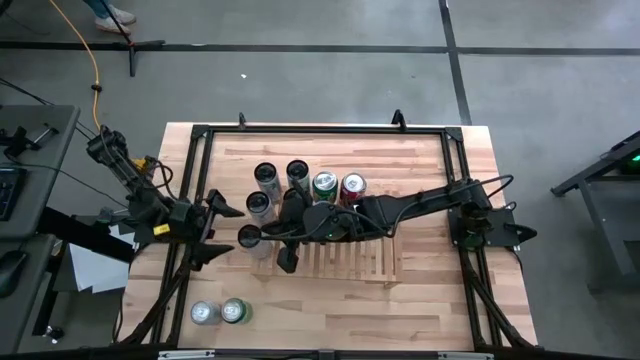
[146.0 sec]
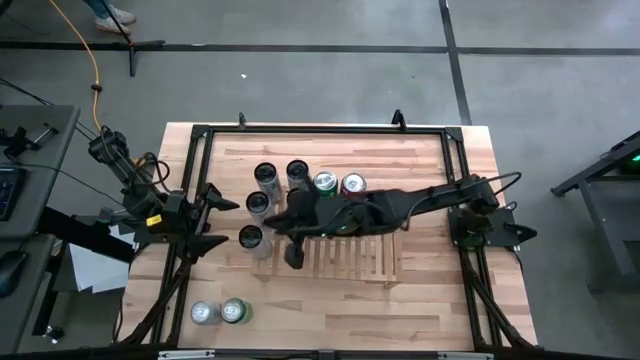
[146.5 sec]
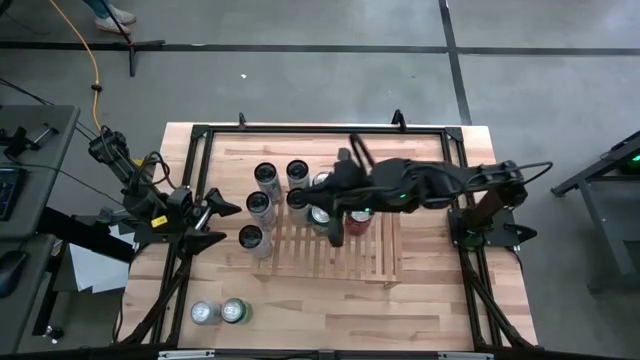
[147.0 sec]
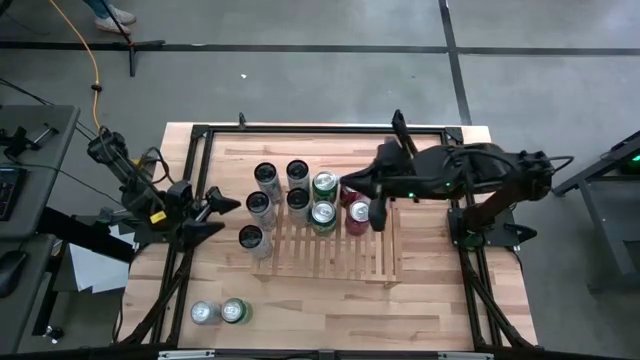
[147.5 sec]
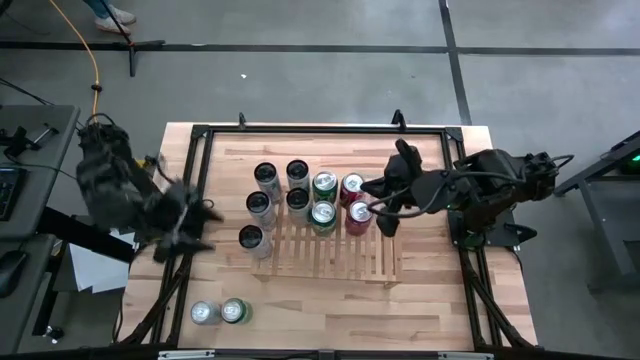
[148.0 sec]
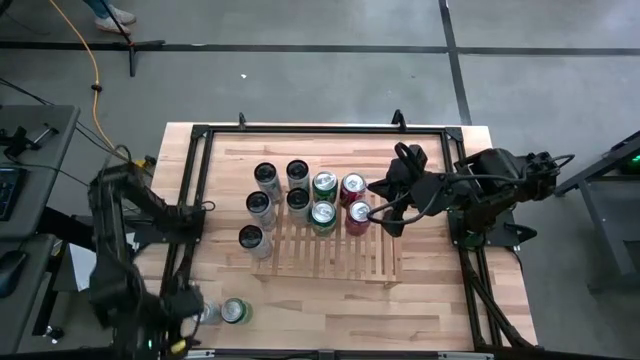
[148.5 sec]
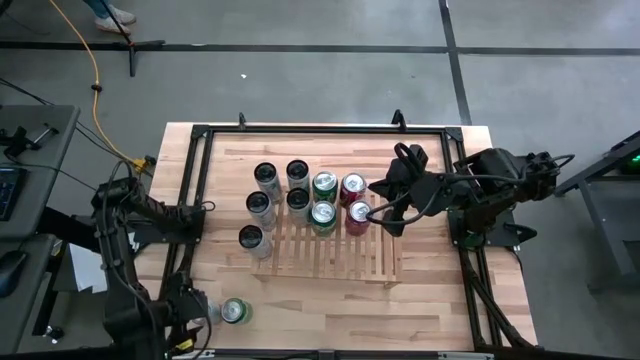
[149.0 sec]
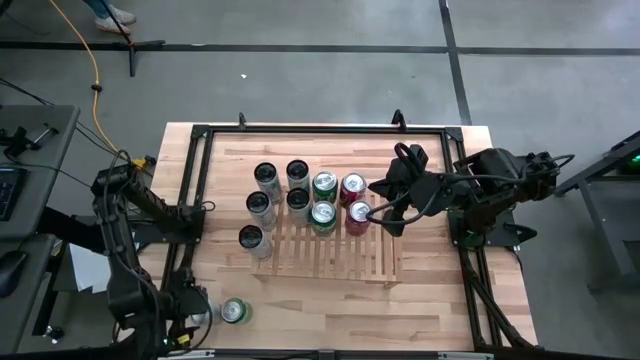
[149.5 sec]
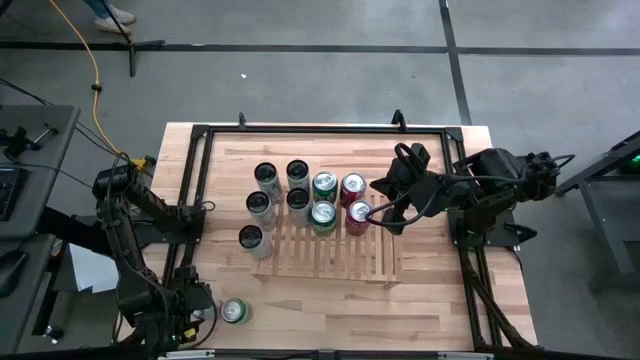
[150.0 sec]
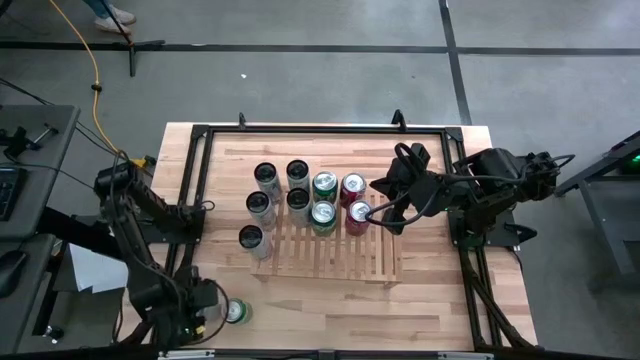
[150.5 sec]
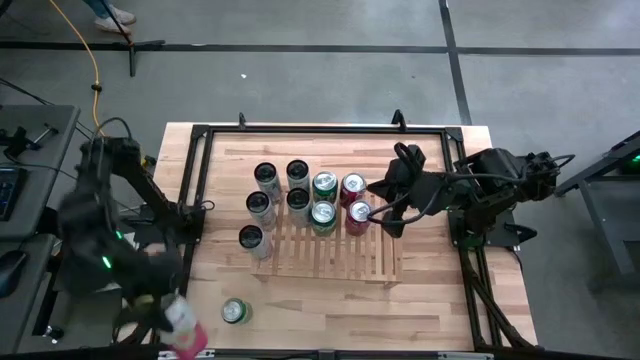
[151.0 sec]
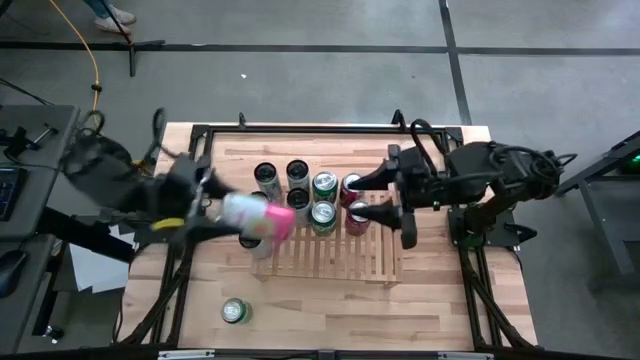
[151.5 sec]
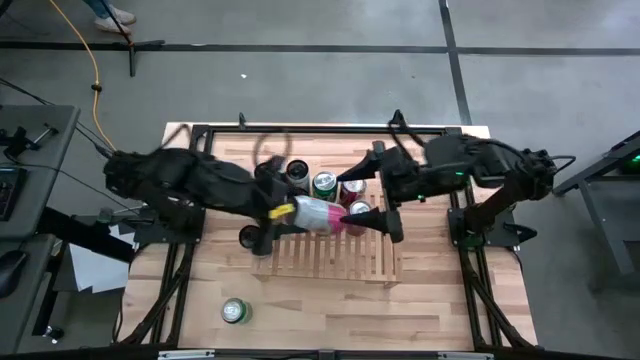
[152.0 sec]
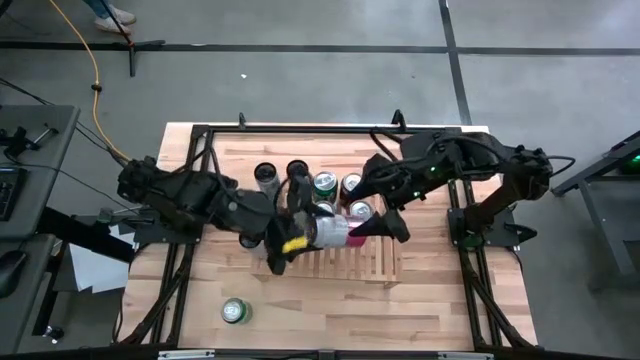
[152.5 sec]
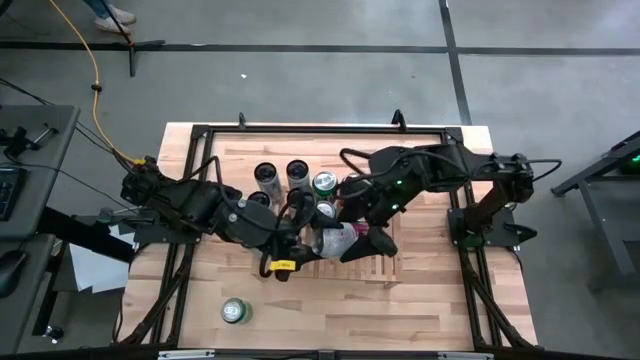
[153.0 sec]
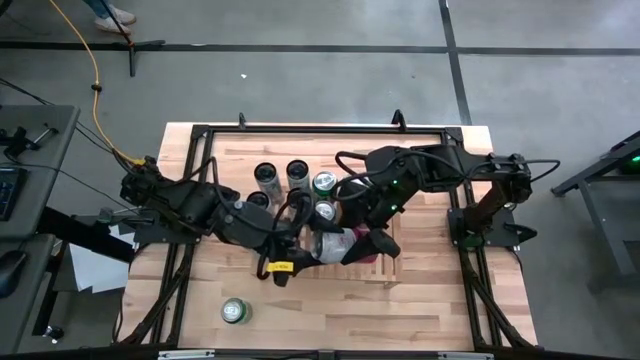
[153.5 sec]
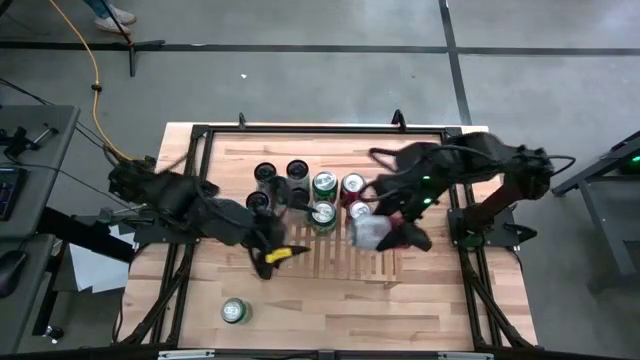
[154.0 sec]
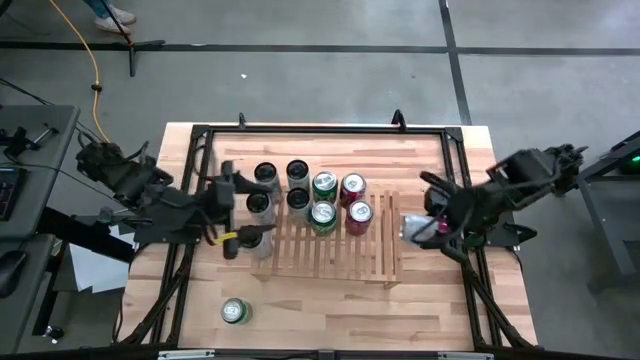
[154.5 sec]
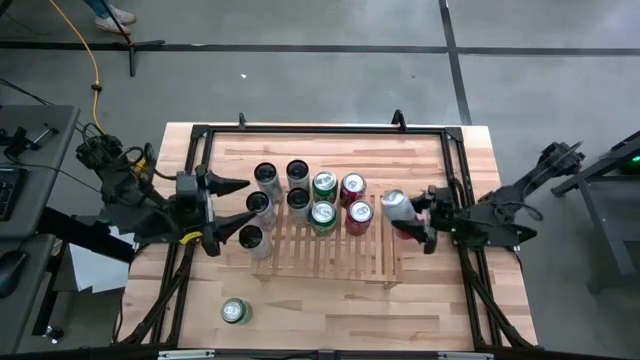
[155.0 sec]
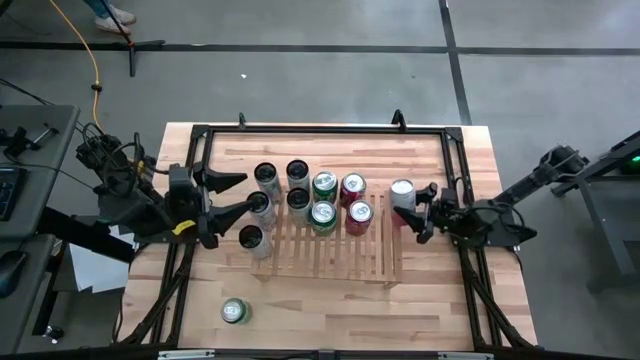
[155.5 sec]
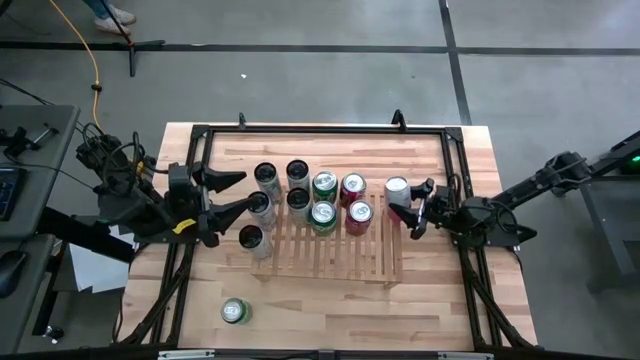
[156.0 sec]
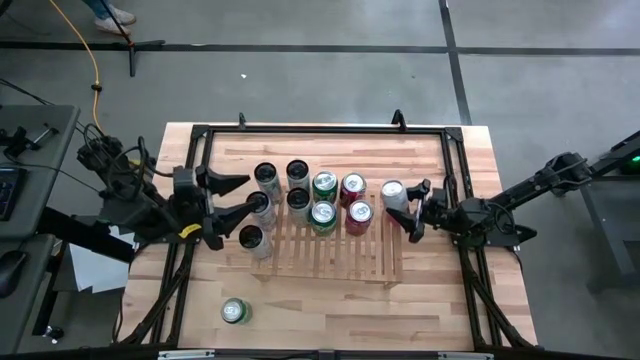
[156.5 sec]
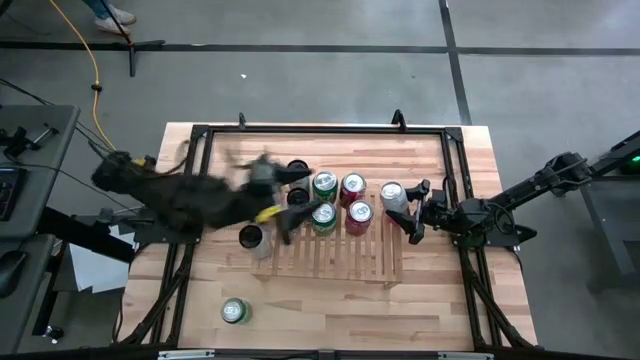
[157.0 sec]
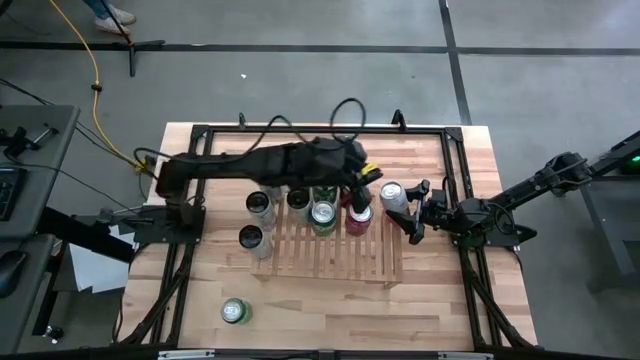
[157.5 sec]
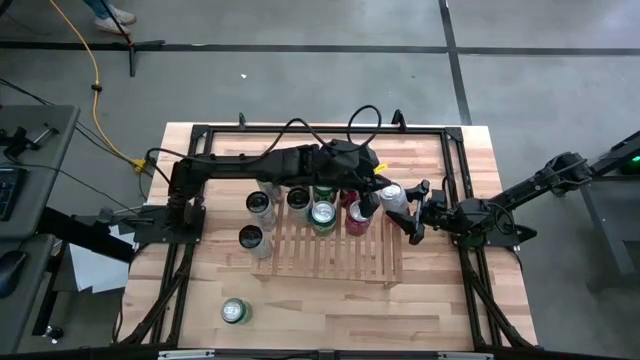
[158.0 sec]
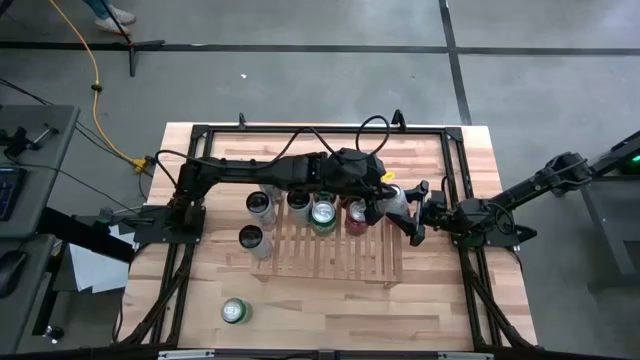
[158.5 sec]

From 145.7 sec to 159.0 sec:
Task: Place canned beverage on shelf
Put the pink white soda can on the shelf

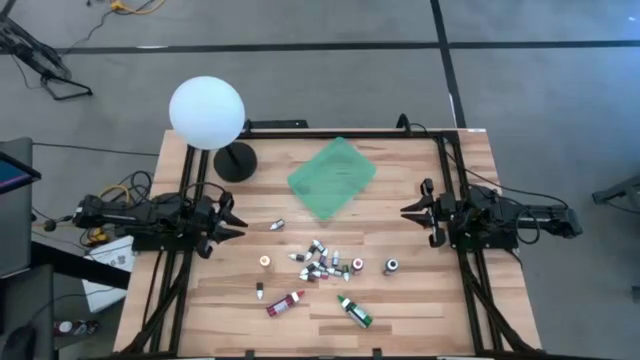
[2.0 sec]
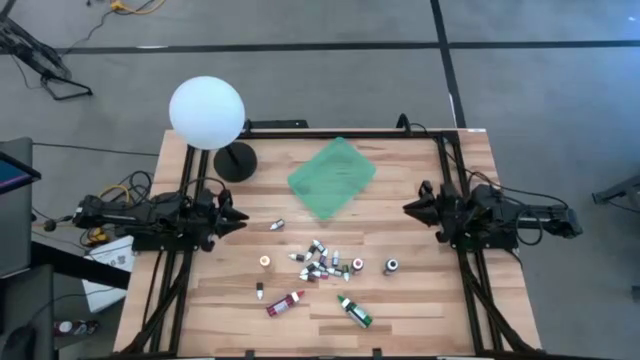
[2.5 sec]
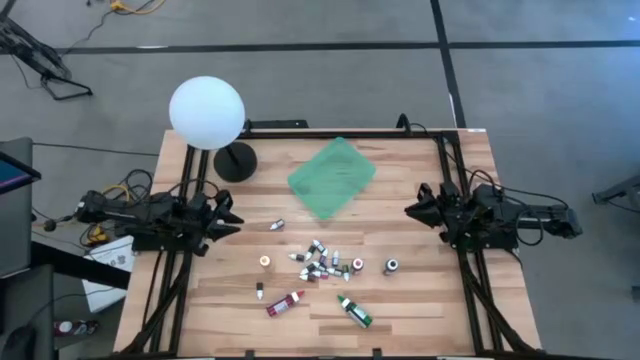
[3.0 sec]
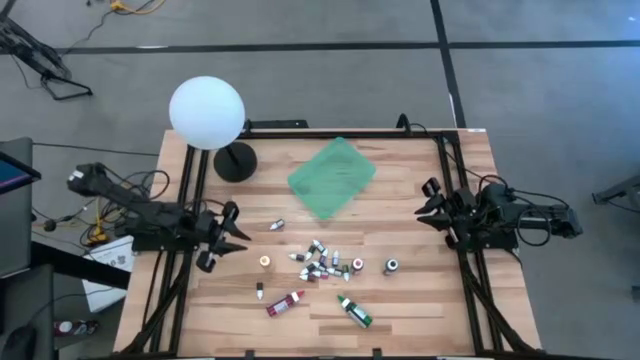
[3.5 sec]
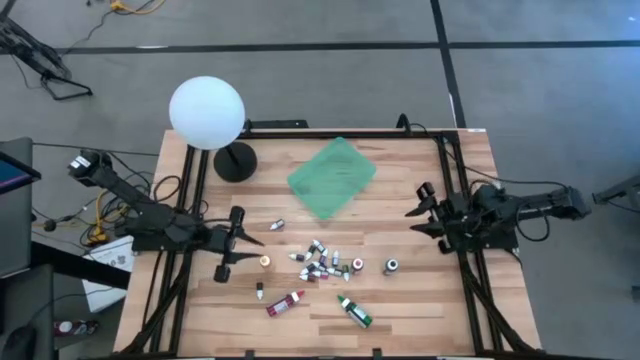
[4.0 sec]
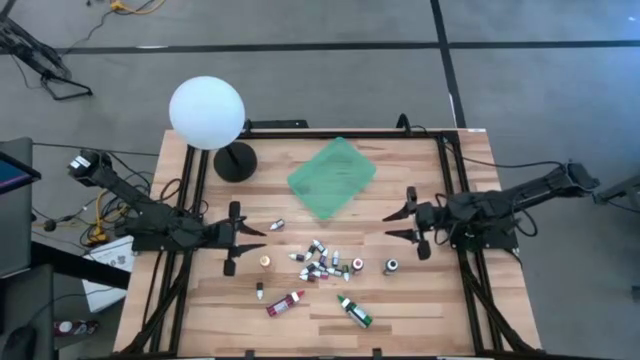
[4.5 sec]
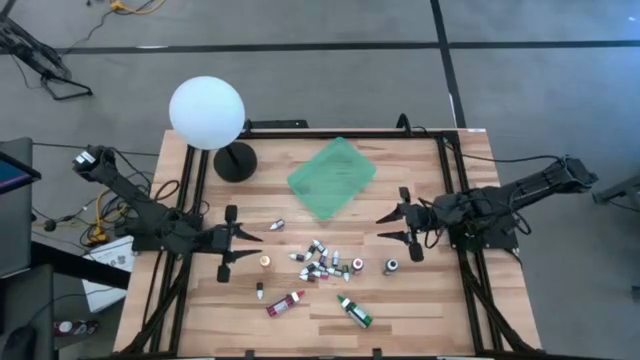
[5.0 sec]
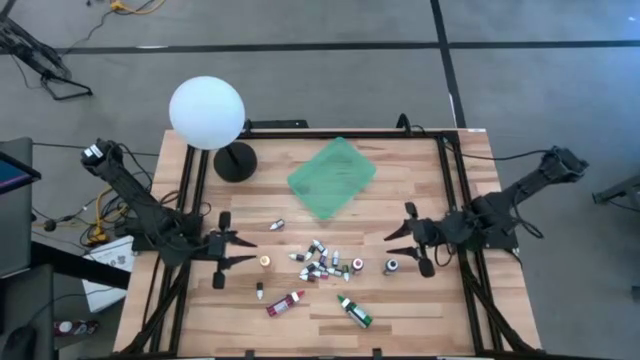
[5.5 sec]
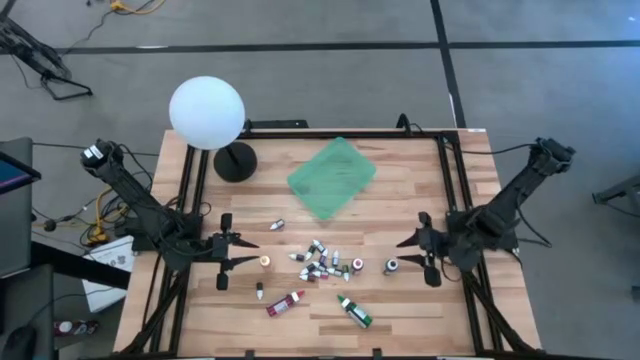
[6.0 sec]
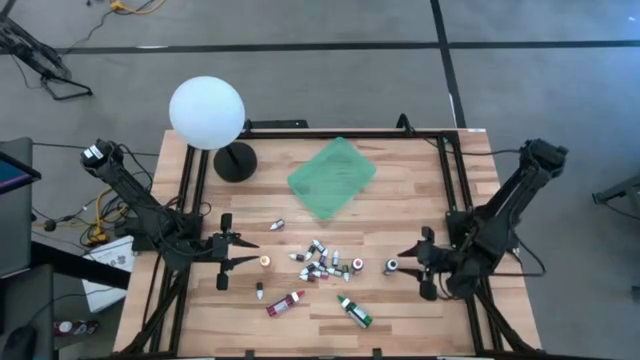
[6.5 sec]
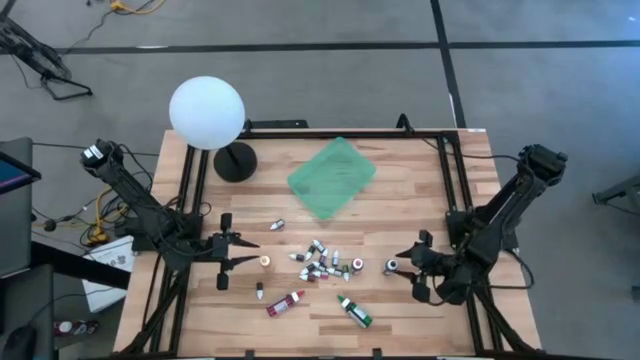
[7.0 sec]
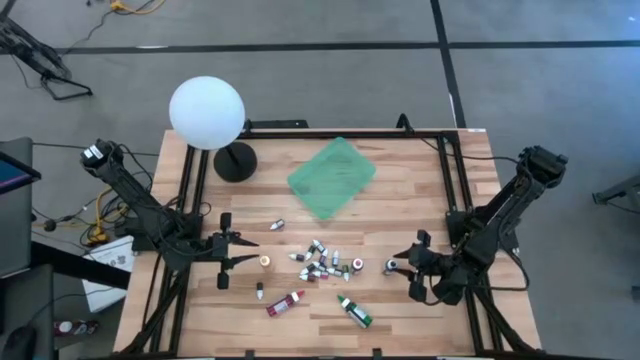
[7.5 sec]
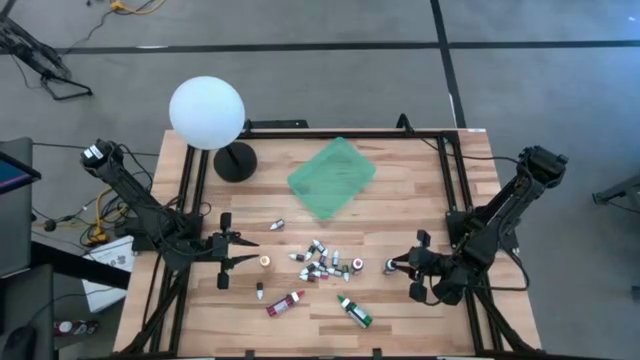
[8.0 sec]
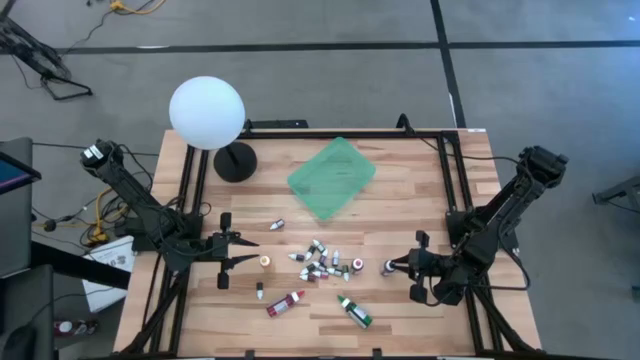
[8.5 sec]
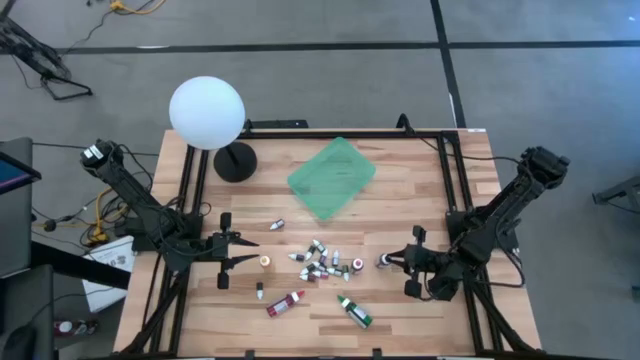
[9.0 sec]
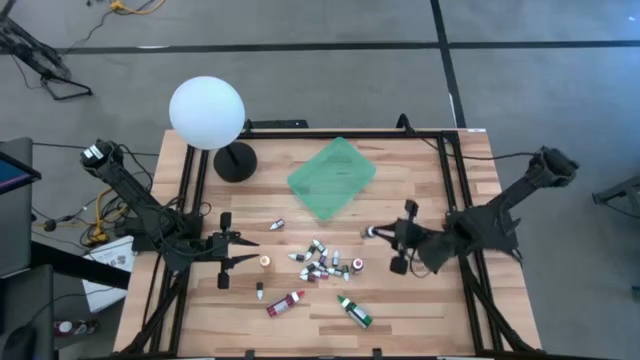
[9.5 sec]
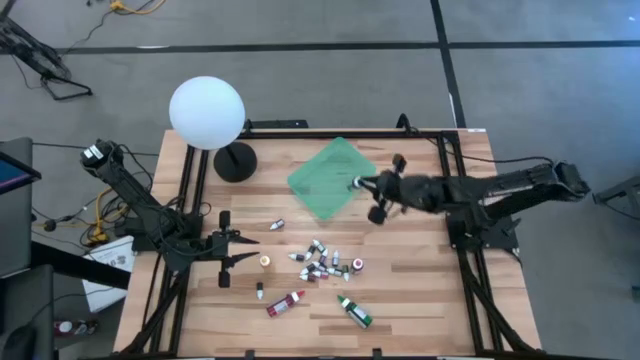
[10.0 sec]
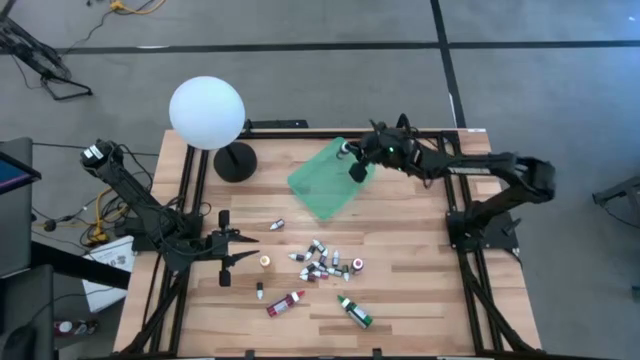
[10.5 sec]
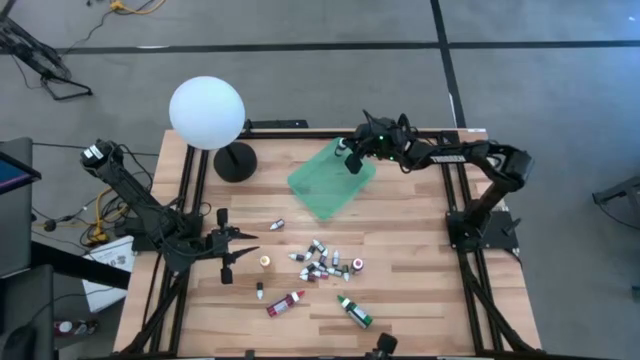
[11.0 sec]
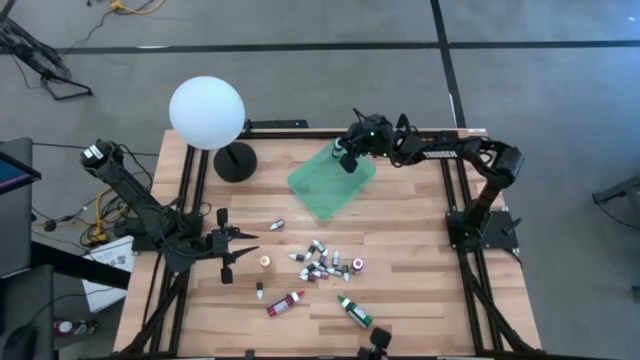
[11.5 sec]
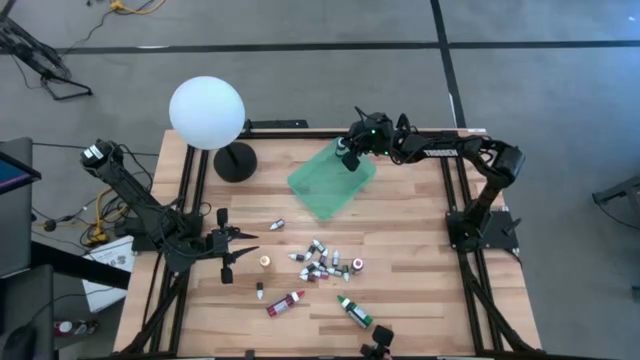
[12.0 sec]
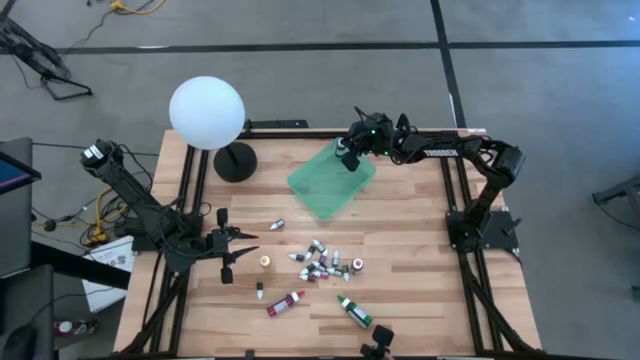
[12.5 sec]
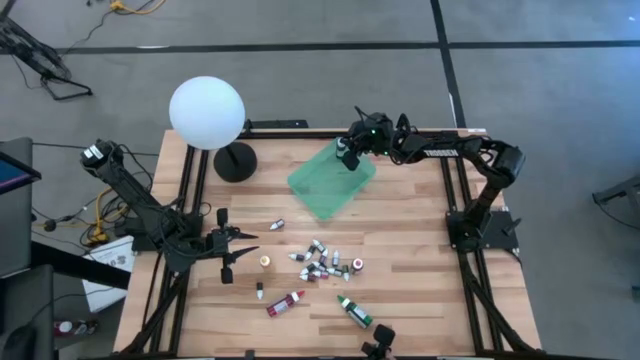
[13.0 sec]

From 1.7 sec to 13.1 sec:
Task: Pick & Place food coloring
Put the right black food coloring bottle into the green bin
